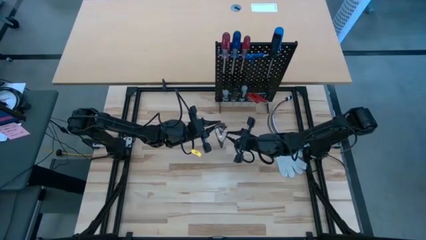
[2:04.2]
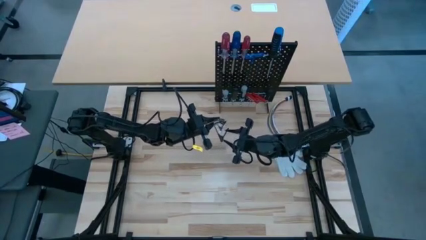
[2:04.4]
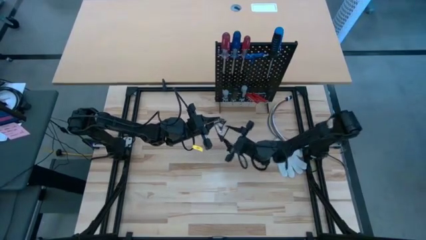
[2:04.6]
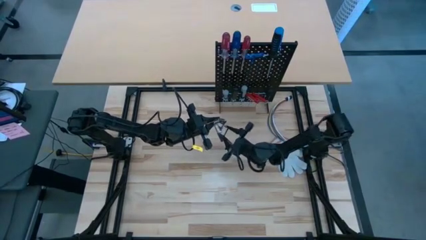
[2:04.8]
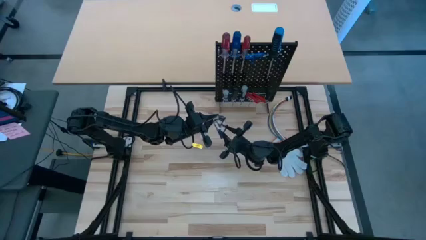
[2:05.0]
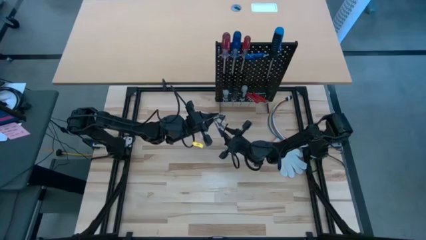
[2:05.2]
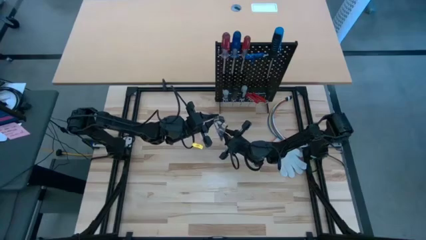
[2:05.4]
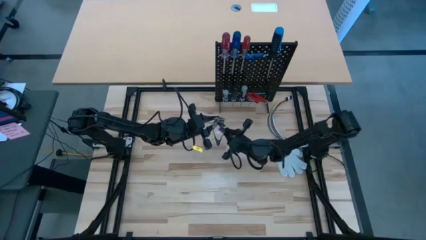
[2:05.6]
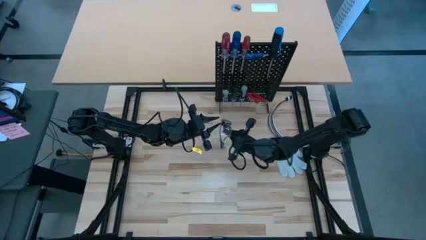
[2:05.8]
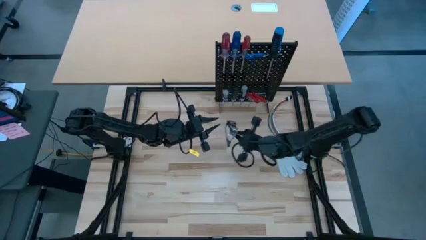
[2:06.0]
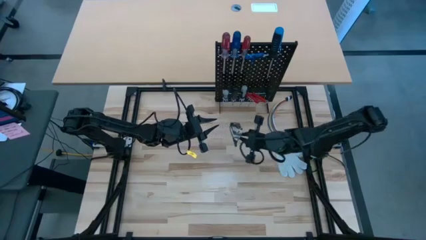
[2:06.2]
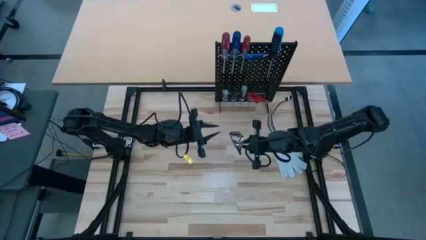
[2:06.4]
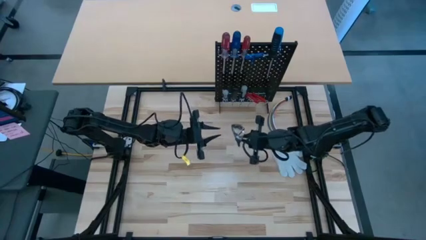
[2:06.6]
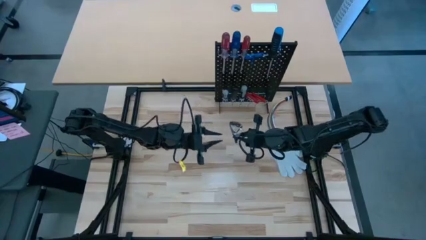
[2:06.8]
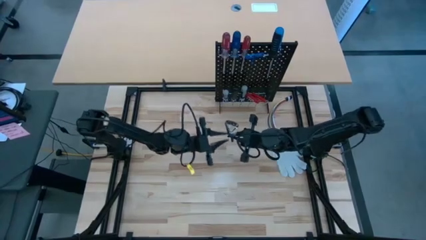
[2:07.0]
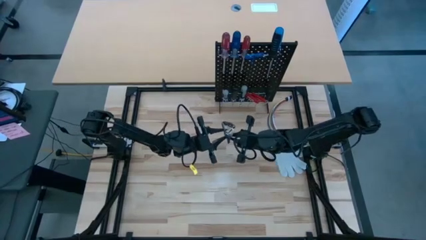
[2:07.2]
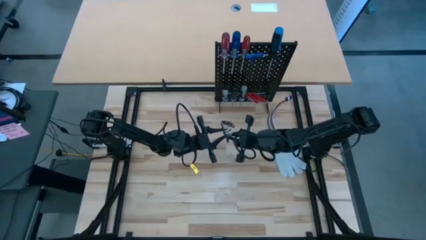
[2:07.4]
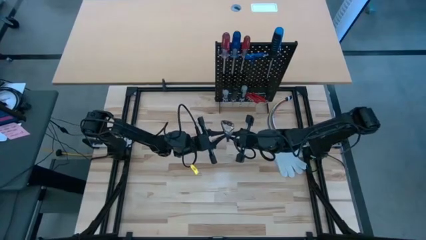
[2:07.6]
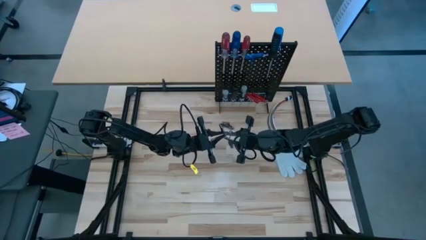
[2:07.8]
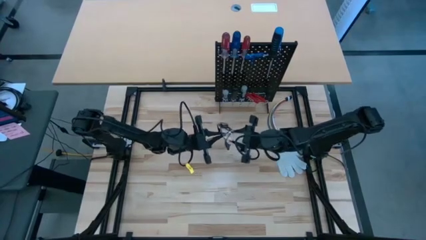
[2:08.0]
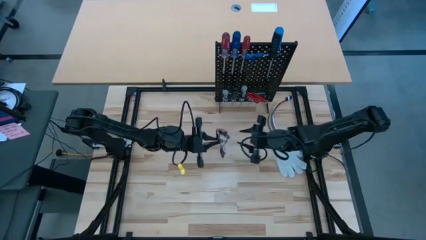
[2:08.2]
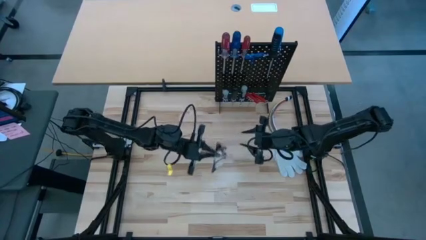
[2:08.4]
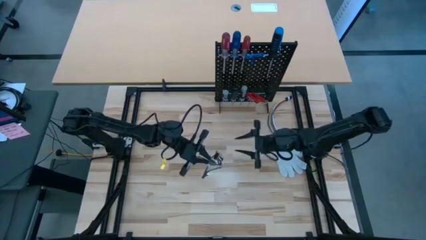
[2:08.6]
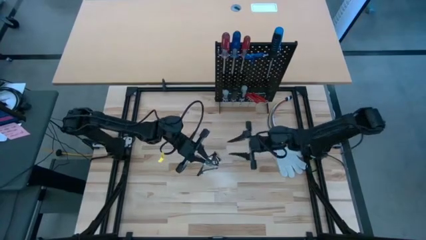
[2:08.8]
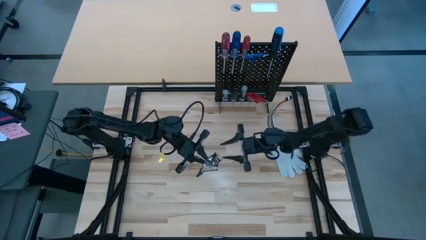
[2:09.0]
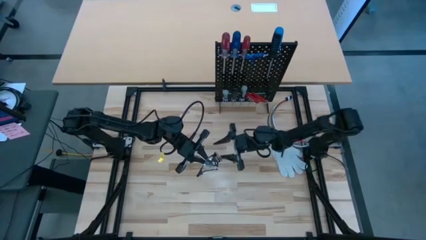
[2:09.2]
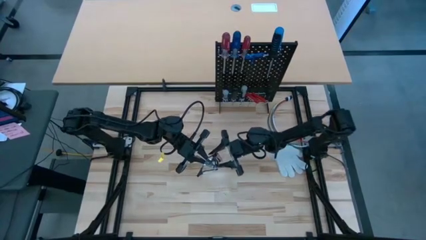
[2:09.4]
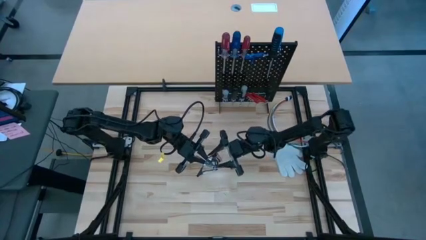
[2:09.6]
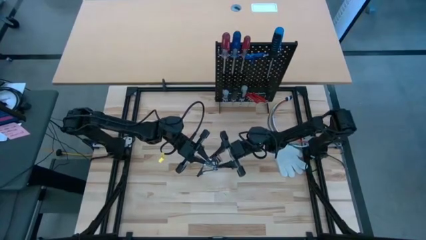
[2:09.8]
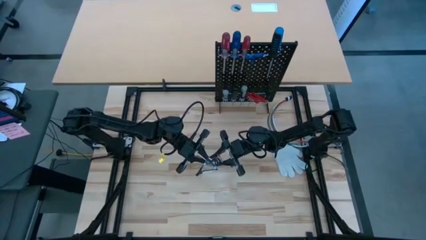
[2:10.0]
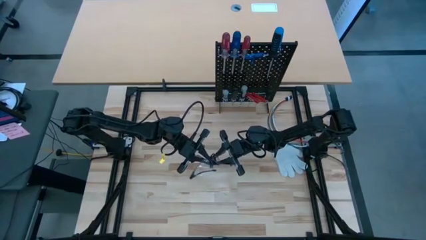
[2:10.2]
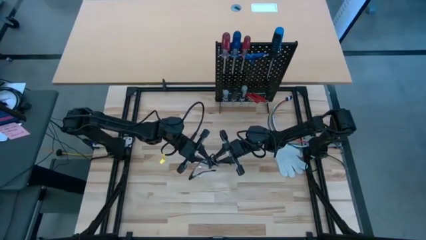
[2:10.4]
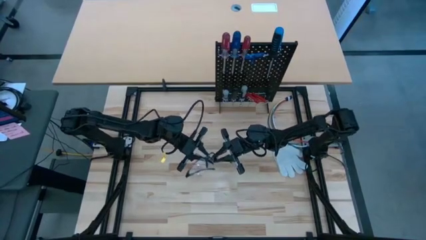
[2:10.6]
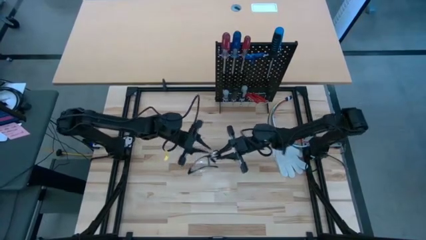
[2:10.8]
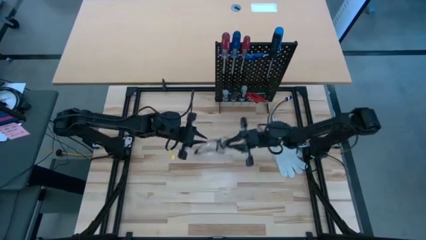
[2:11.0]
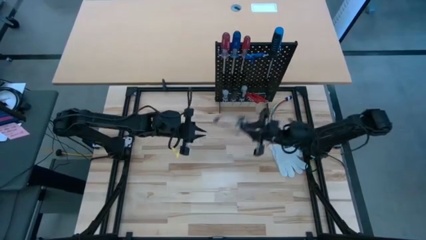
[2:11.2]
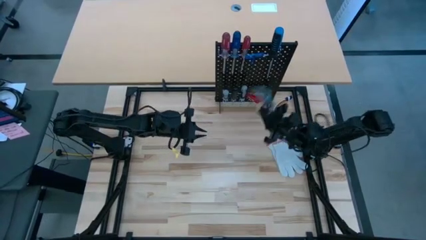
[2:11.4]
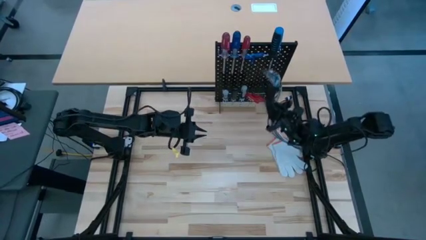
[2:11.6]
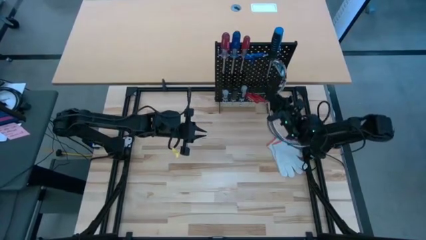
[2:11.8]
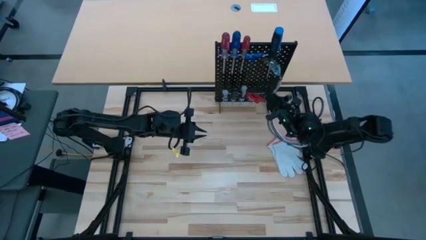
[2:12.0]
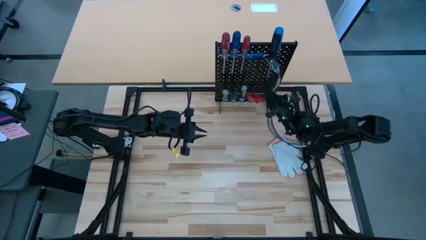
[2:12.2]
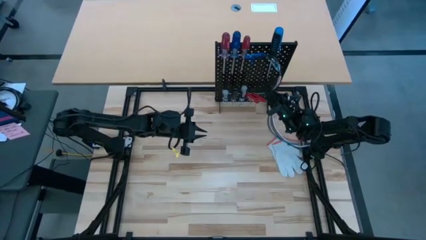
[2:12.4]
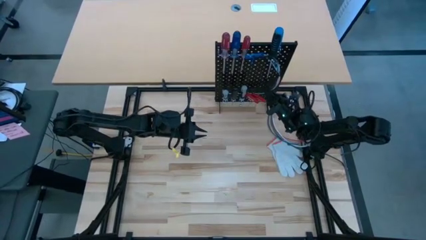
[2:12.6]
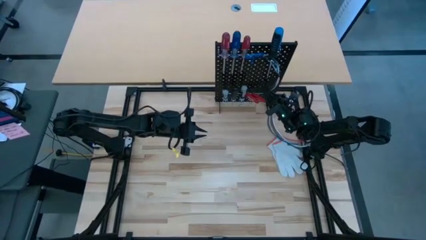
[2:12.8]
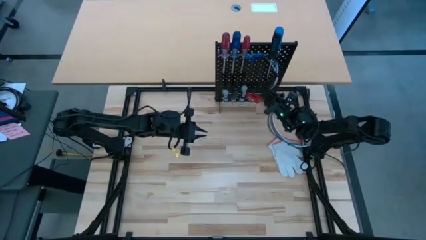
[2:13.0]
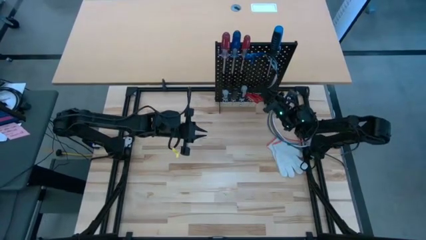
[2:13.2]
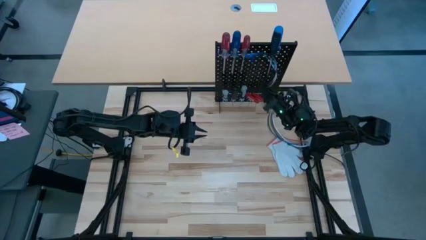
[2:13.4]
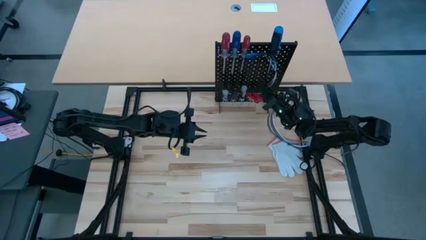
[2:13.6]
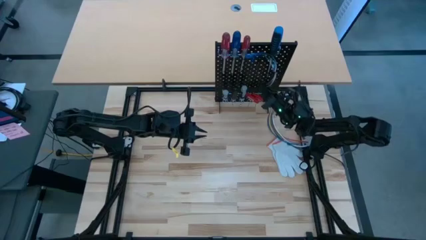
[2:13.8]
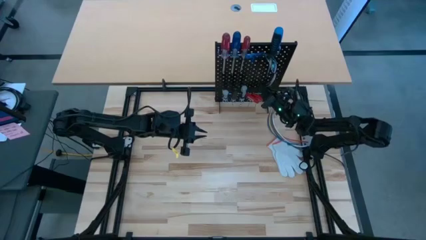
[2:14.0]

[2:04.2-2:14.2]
Task: Hang tools onto peg board
Hang the safety goggles on the pegboard

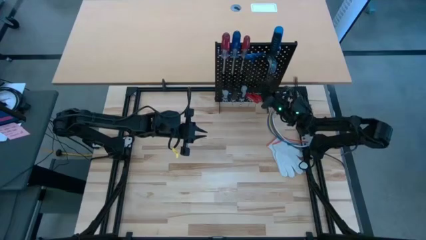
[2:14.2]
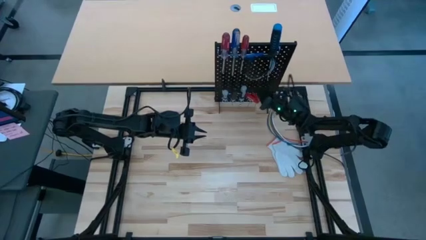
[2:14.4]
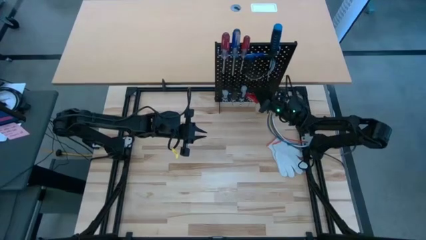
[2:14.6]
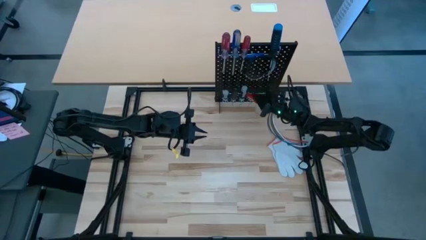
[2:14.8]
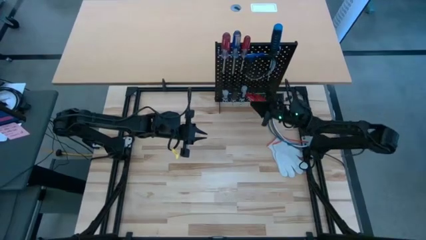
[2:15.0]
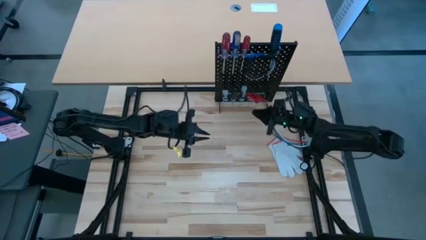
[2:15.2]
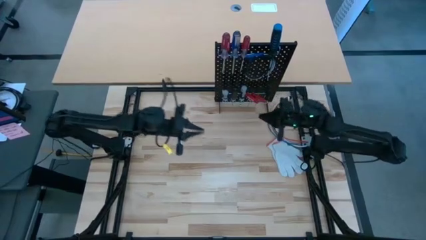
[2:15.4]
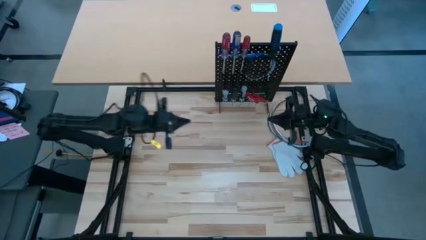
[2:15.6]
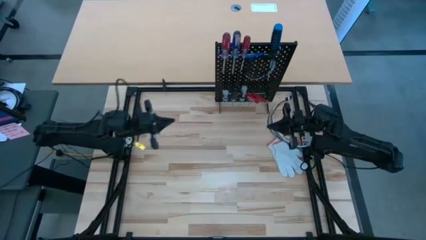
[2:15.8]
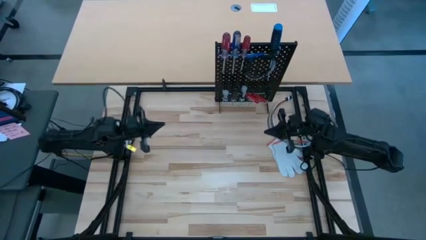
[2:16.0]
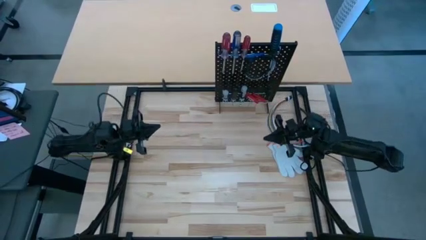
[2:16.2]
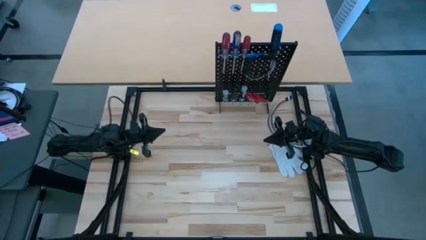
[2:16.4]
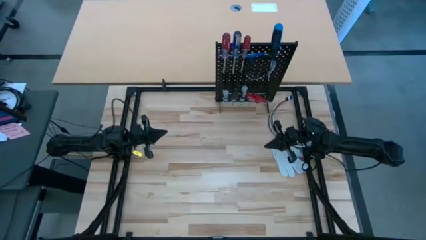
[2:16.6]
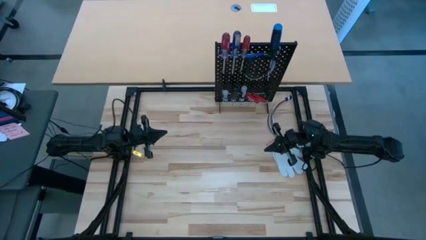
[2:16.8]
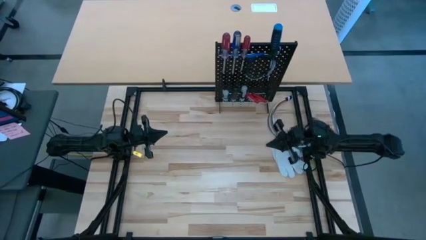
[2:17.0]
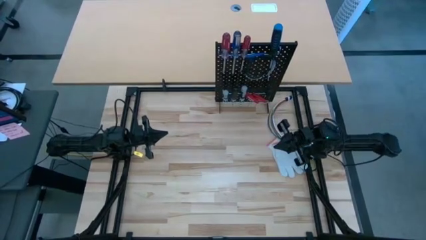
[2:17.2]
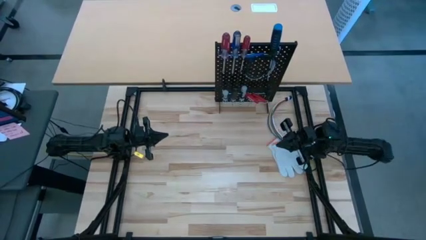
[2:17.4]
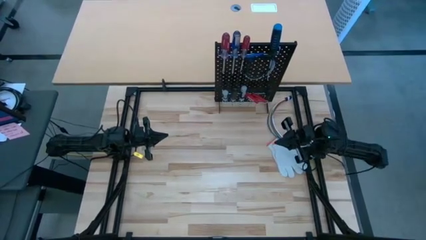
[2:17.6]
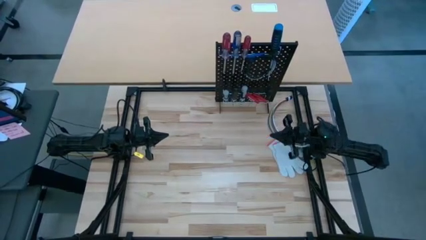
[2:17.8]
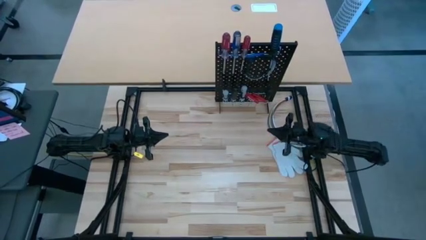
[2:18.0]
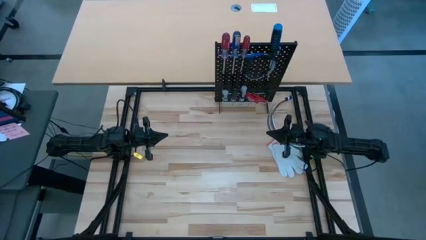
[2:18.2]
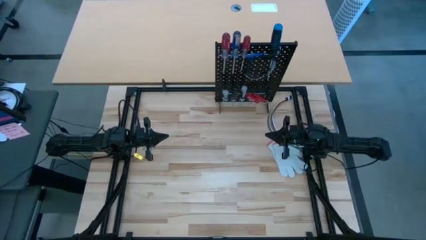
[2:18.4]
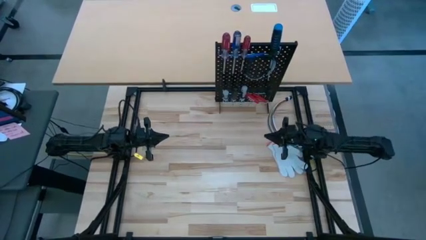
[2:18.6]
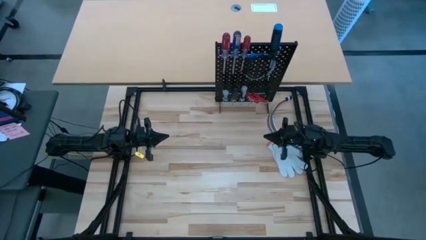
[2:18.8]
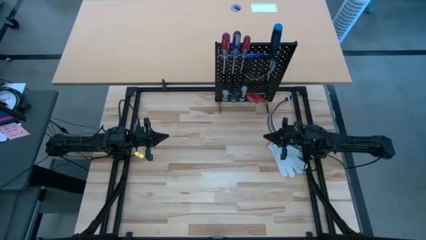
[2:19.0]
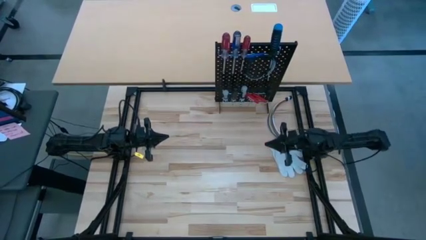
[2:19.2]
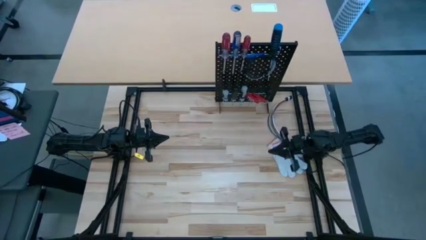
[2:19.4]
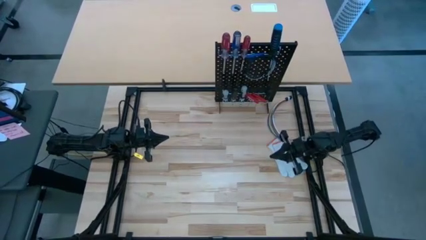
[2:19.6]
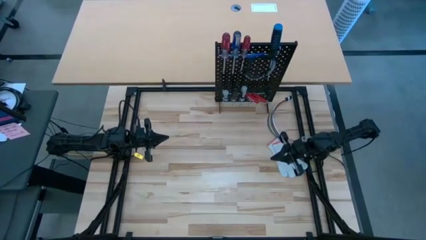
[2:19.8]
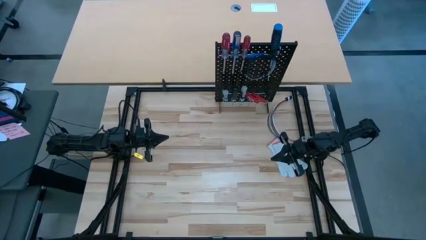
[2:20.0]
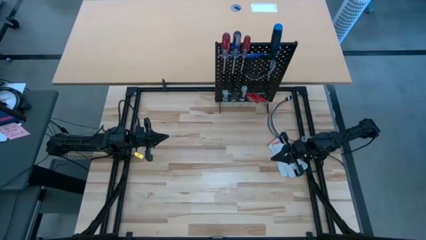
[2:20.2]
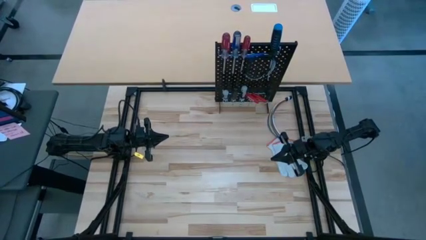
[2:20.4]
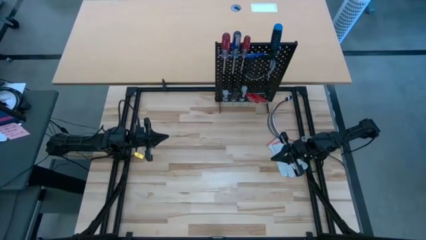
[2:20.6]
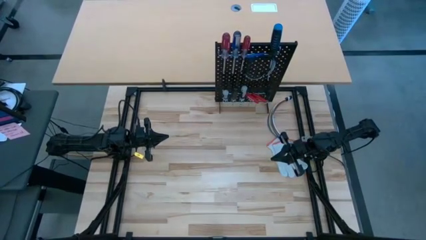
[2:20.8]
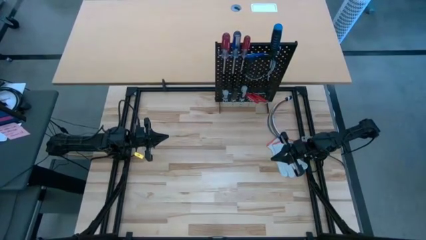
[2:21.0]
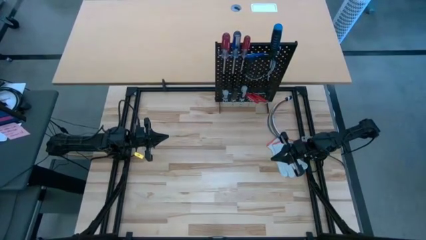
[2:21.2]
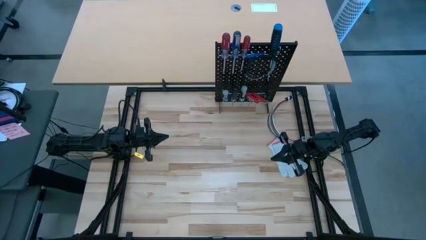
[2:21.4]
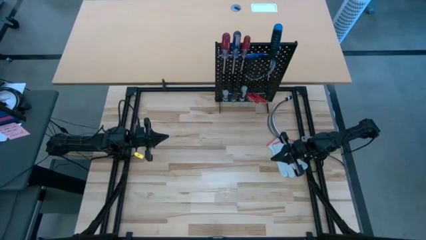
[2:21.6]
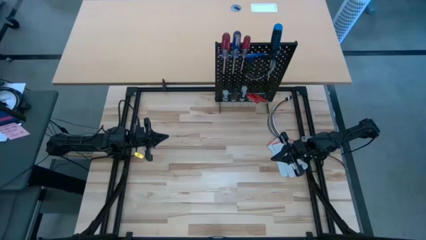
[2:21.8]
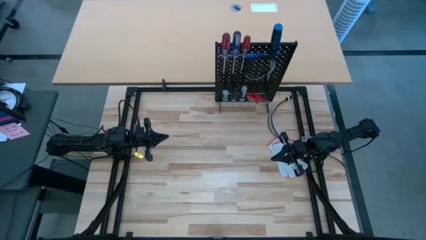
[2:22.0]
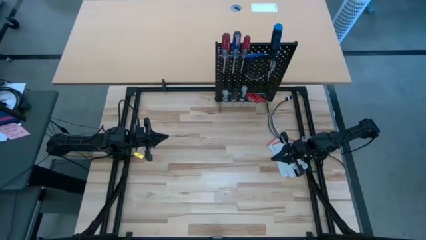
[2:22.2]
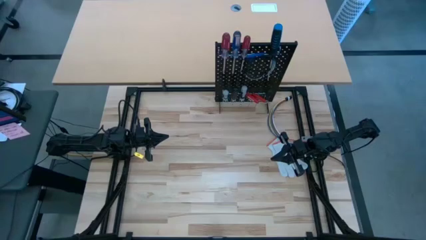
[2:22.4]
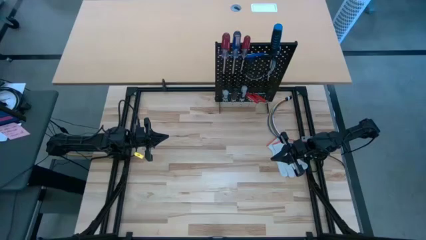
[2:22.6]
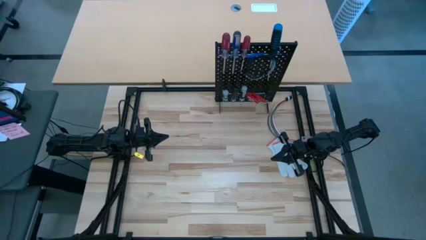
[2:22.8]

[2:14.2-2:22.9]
Return to Home Position
